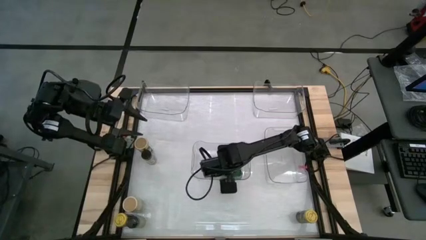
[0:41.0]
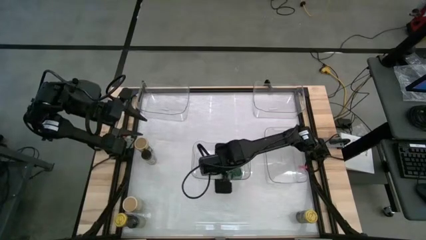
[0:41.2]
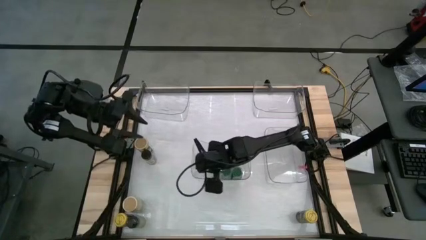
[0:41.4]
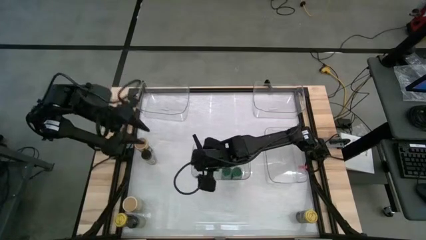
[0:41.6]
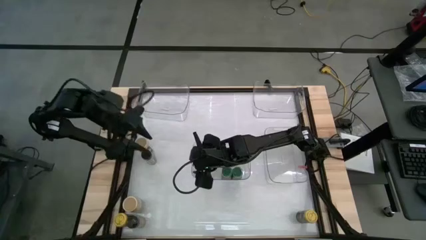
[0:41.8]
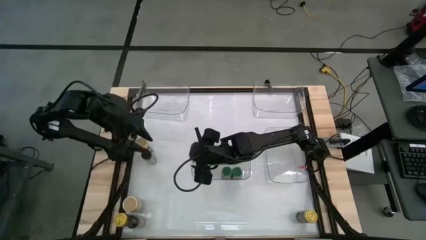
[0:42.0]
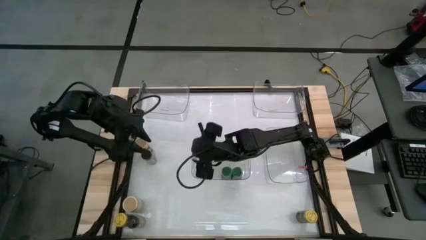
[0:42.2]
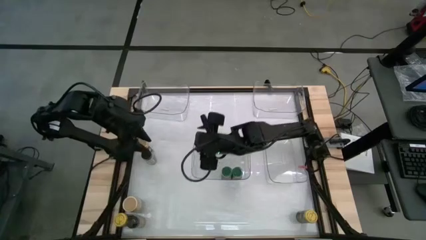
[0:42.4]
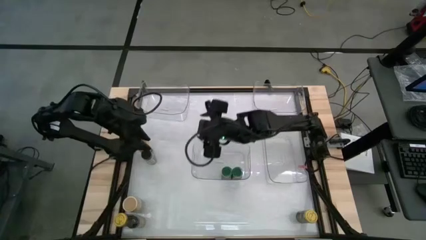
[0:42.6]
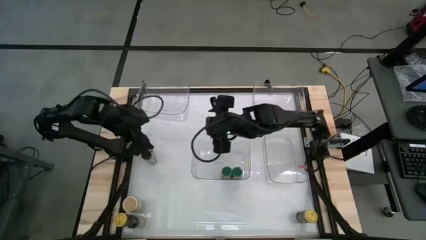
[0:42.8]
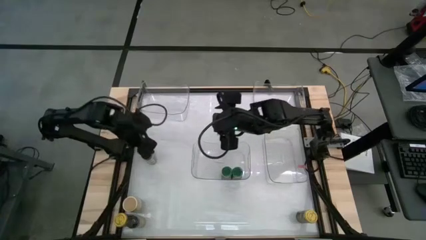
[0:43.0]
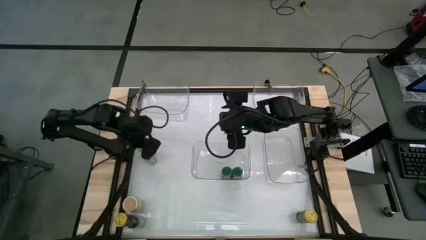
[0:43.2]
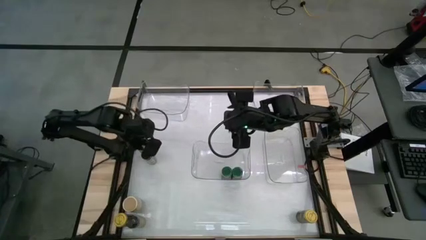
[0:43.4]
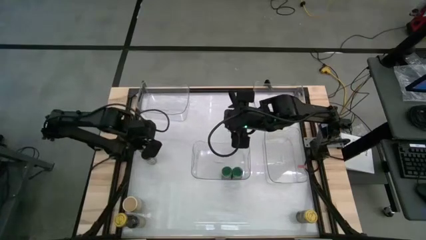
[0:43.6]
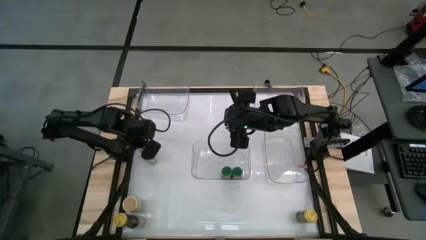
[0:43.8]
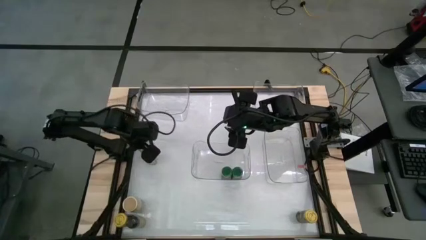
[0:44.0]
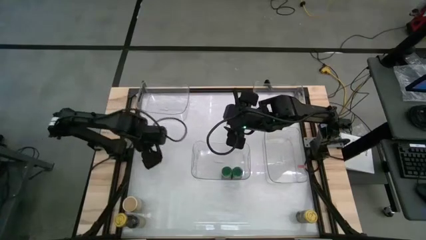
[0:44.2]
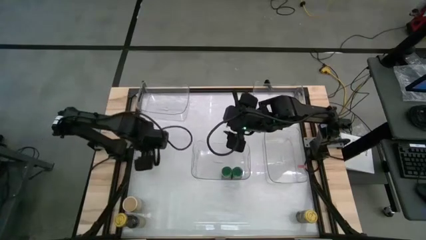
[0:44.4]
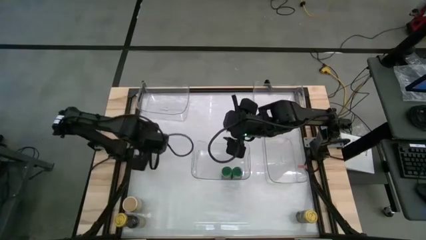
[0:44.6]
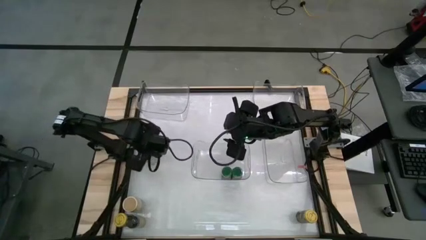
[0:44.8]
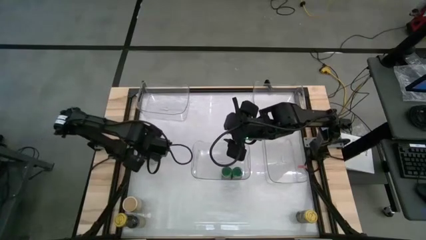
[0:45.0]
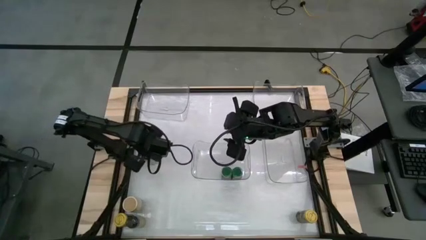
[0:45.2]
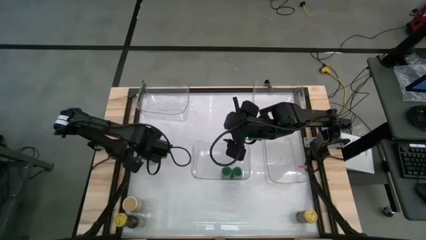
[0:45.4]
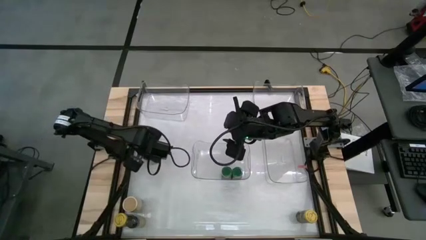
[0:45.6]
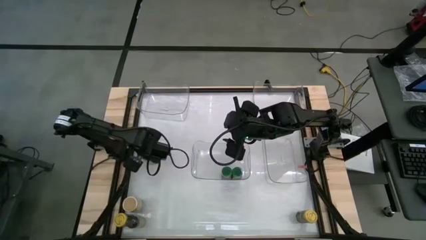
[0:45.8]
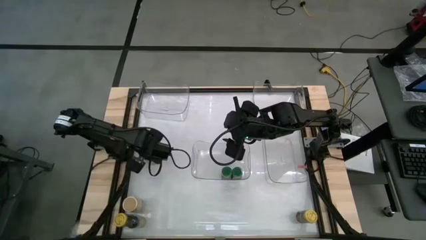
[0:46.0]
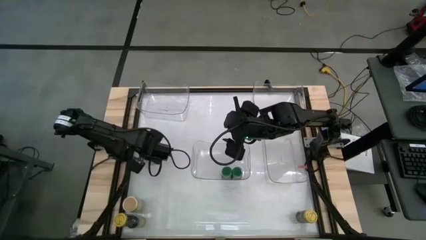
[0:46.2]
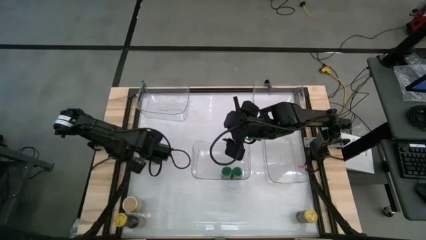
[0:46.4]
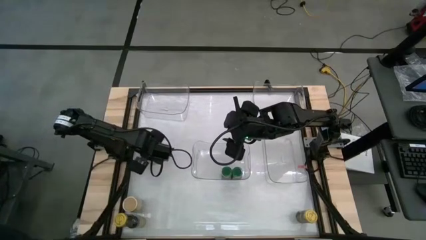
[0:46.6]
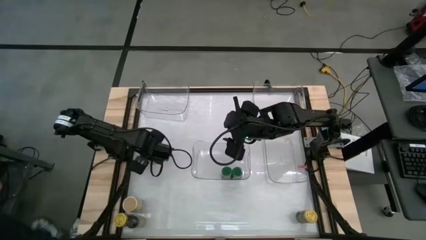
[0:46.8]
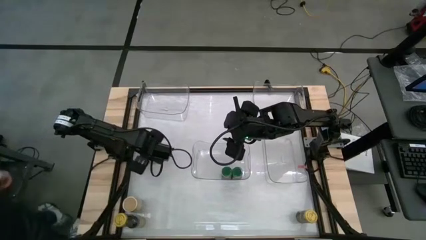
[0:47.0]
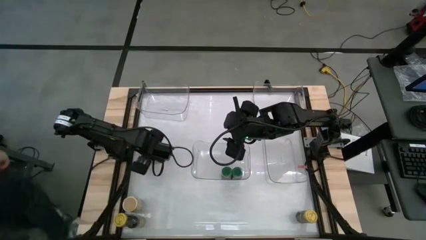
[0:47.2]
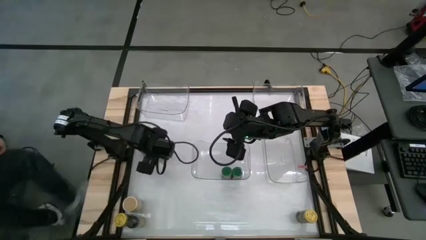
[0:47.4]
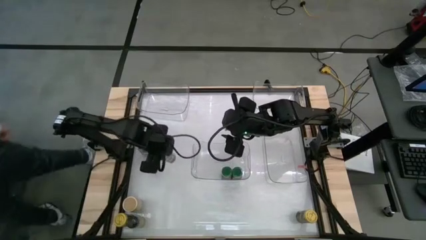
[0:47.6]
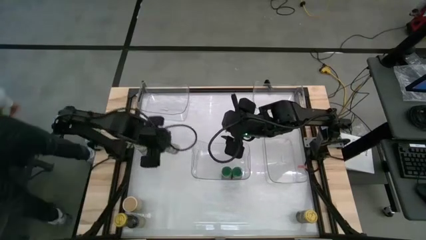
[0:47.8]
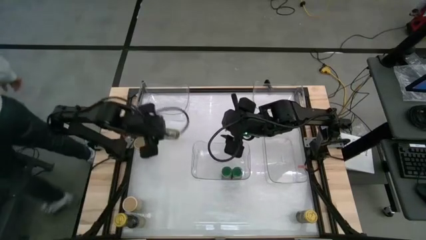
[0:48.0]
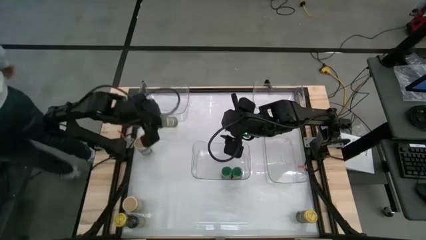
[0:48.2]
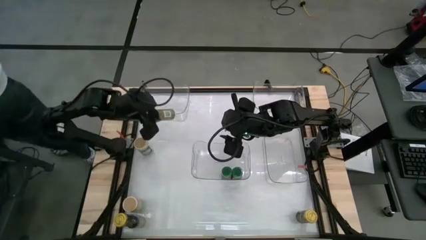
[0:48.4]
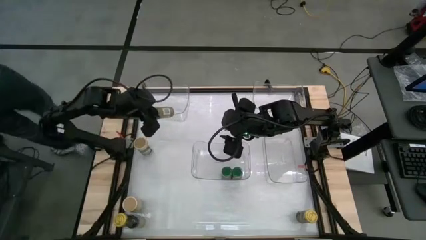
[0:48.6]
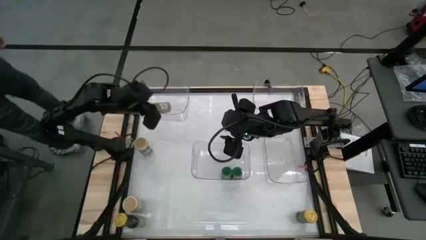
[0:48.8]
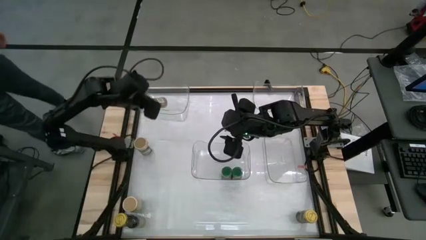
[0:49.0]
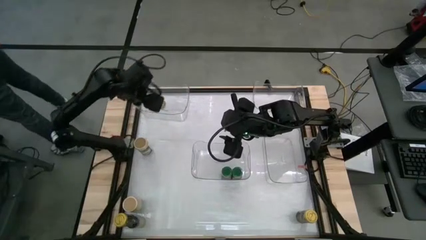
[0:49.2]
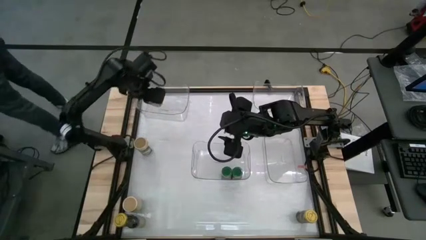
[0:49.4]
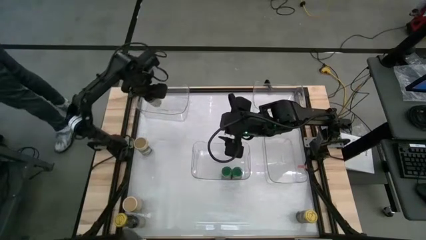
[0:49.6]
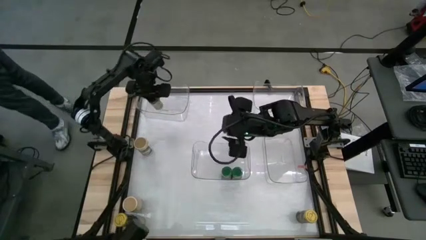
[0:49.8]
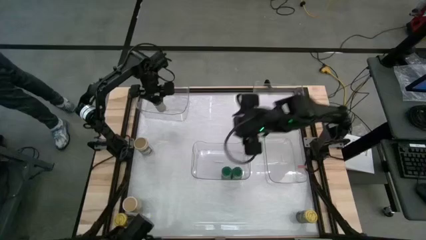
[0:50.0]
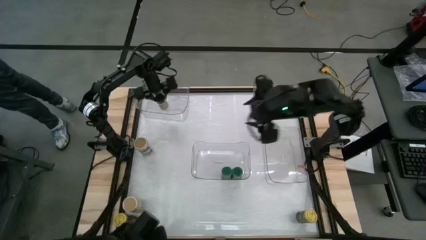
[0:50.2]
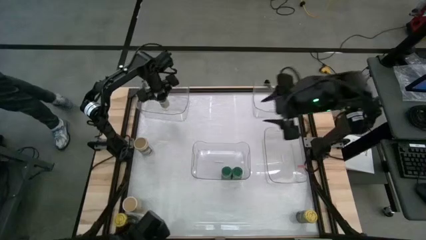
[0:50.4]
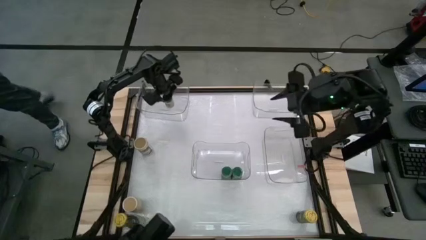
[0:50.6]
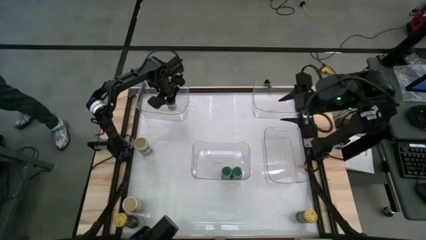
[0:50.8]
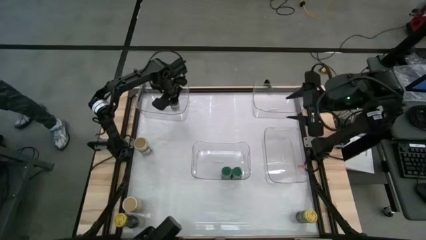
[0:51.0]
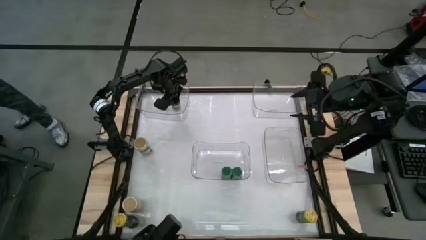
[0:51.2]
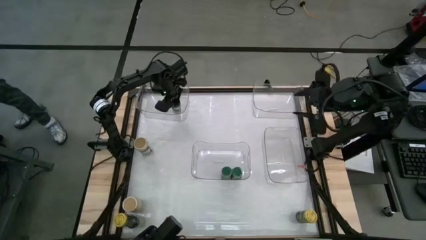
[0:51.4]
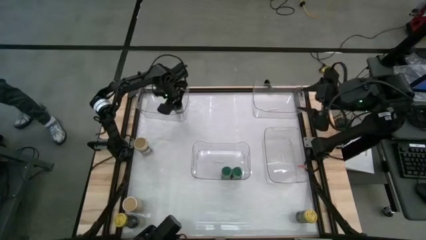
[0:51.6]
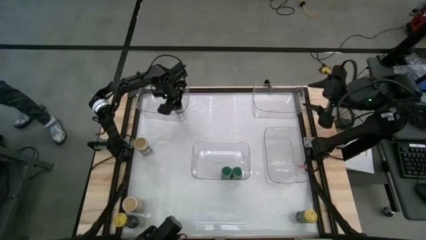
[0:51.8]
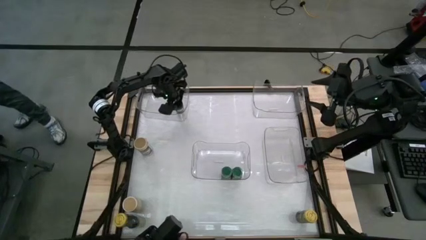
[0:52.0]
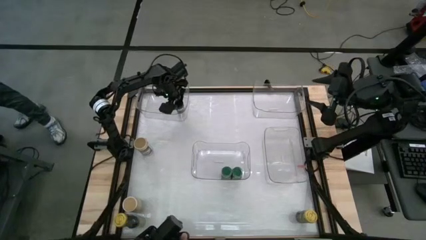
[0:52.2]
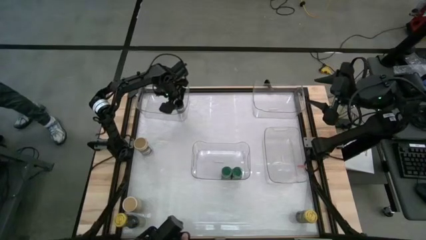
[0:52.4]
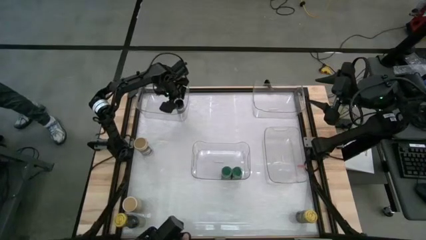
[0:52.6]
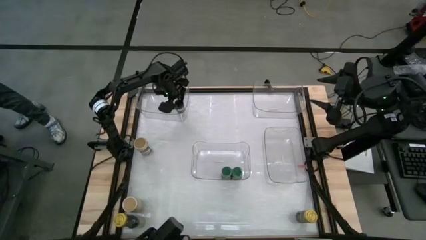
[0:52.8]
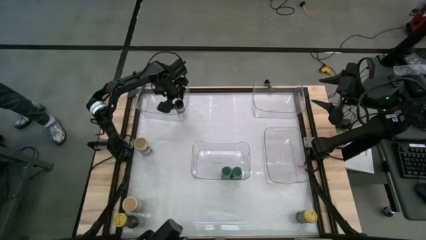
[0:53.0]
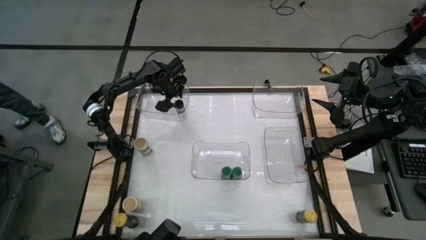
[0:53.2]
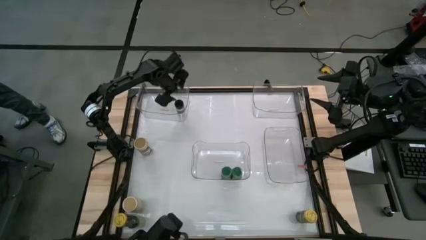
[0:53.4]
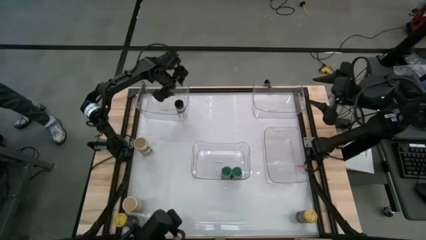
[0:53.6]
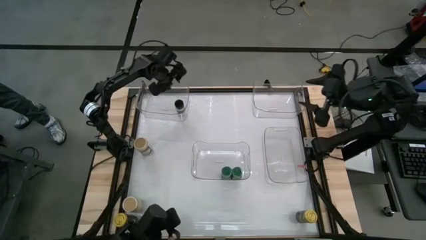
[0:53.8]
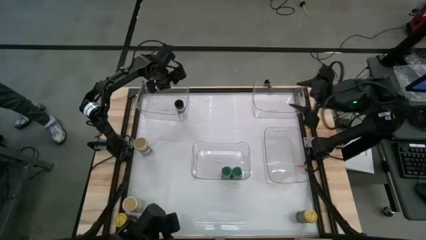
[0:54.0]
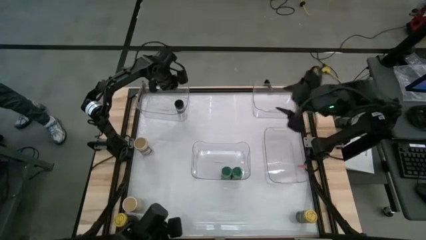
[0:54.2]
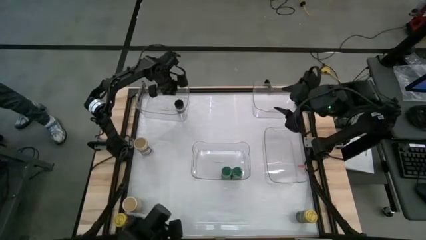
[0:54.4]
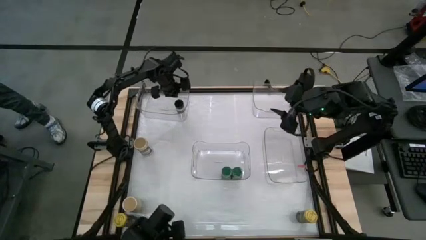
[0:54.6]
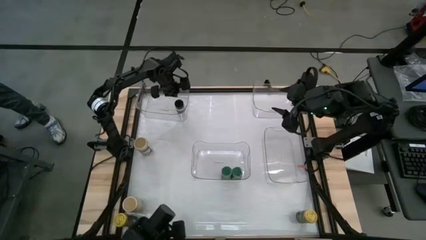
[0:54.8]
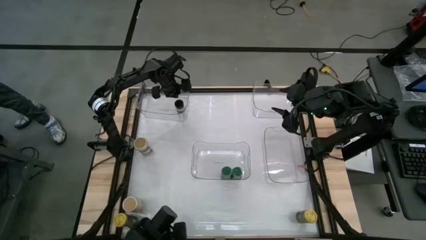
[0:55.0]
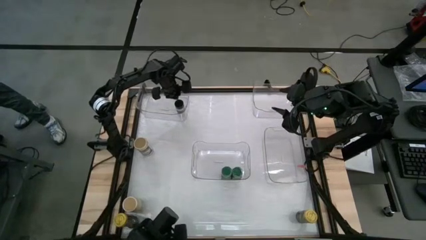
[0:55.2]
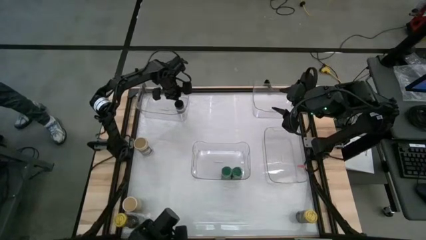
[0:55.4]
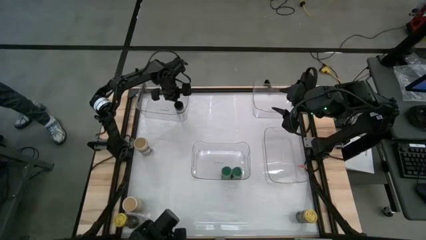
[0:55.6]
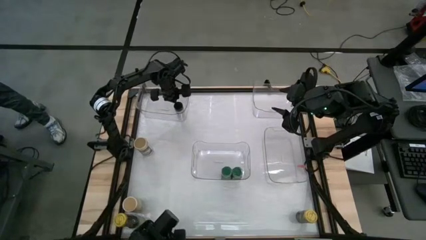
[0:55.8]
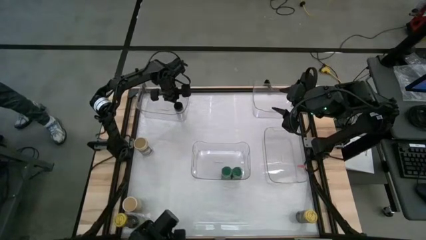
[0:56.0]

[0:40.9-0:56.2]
Task: Sort spices by type
Put the top black seasoning bottle into the top left transparent bin
